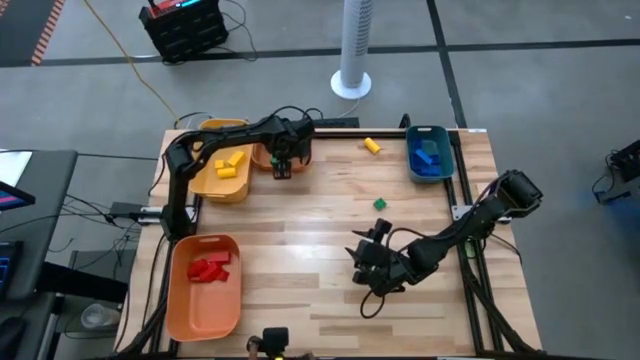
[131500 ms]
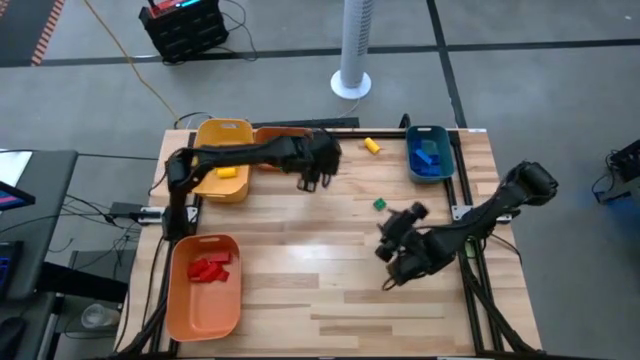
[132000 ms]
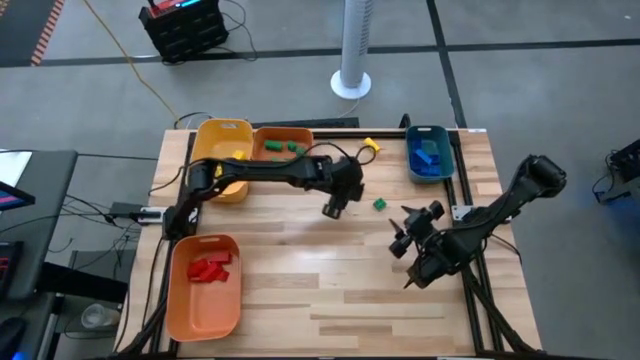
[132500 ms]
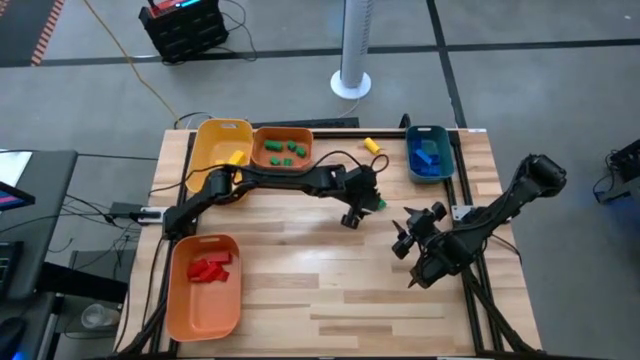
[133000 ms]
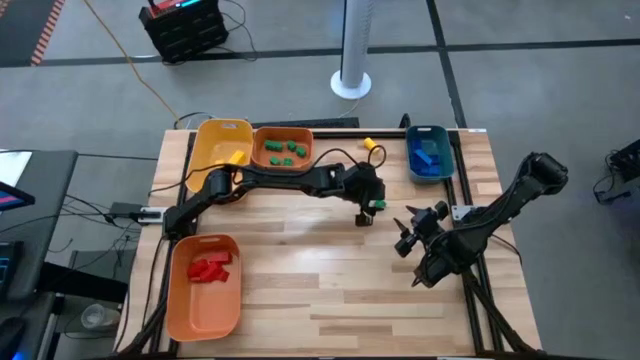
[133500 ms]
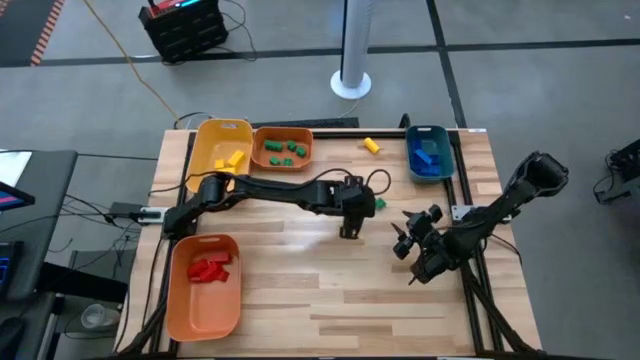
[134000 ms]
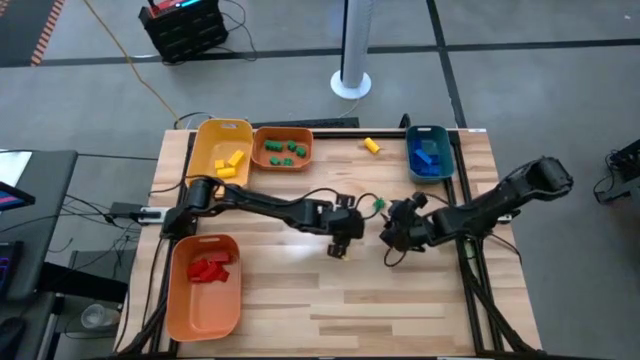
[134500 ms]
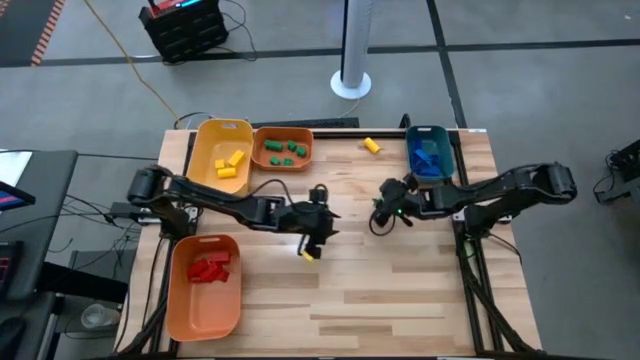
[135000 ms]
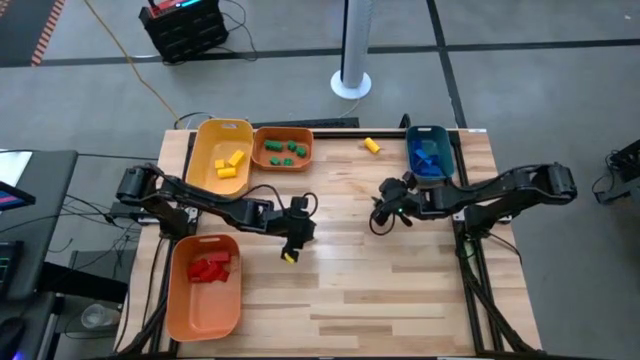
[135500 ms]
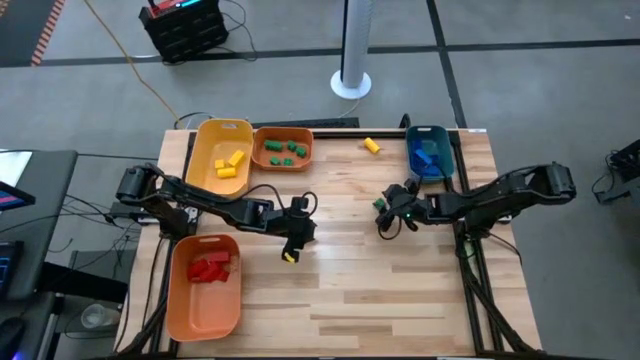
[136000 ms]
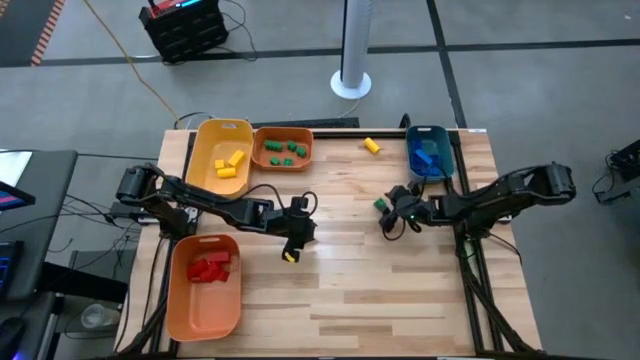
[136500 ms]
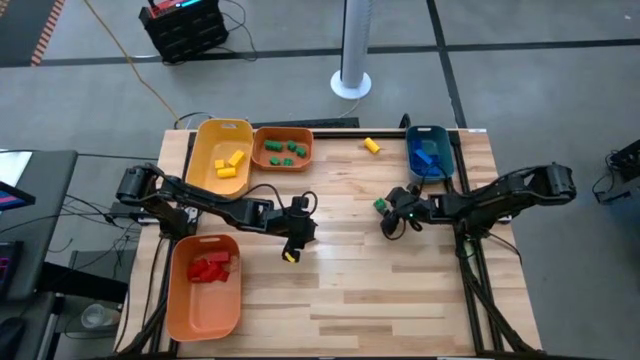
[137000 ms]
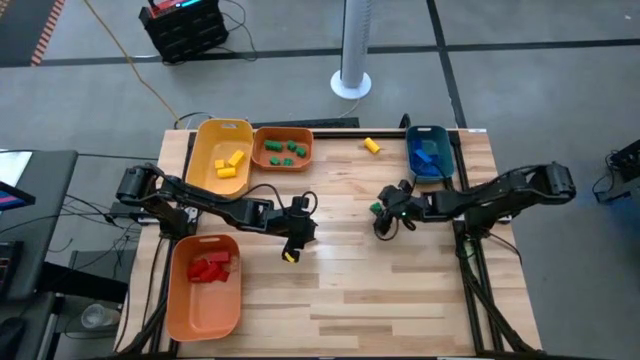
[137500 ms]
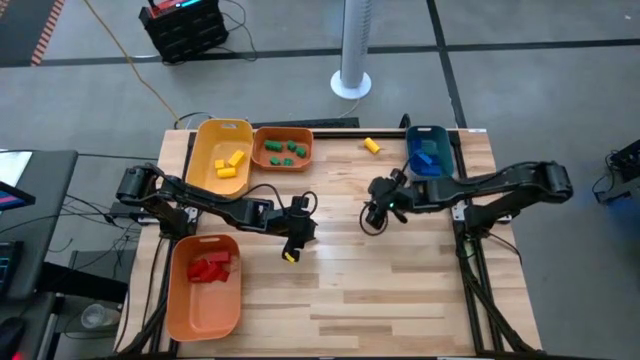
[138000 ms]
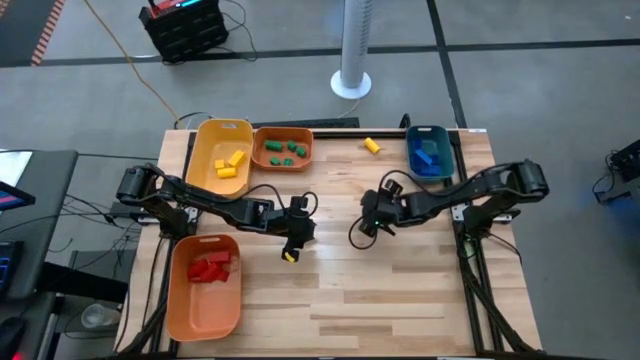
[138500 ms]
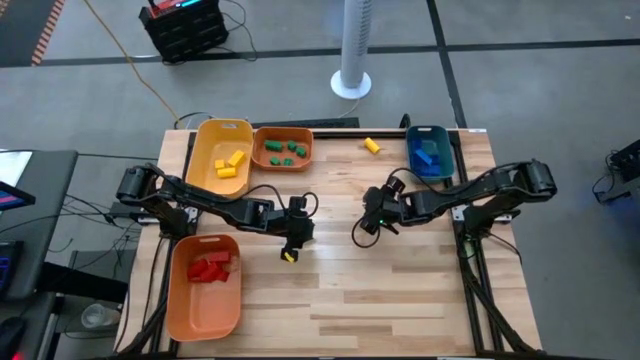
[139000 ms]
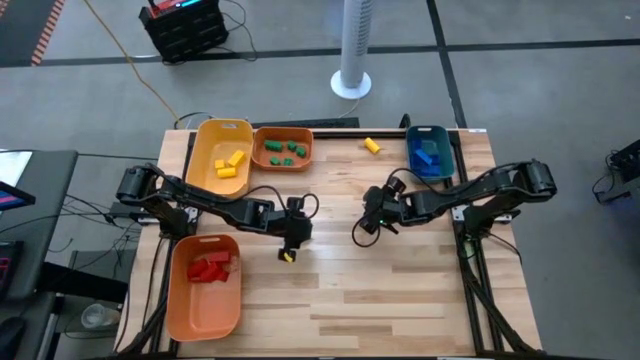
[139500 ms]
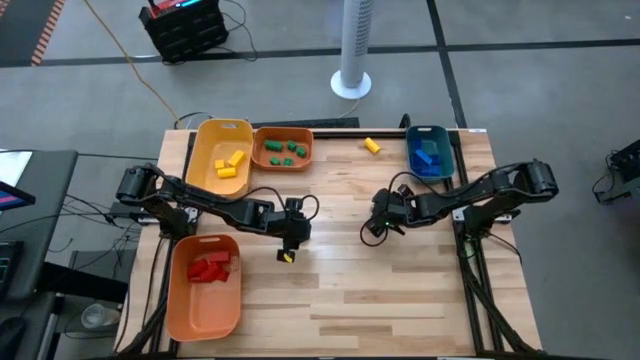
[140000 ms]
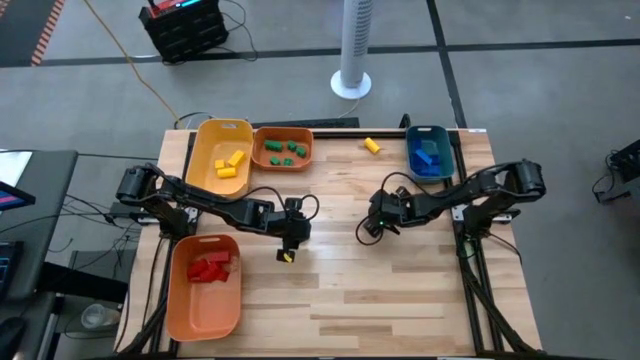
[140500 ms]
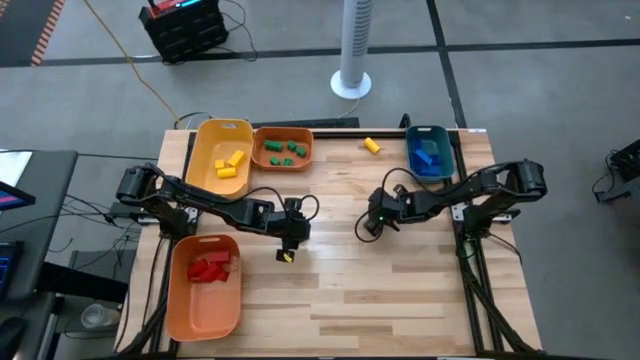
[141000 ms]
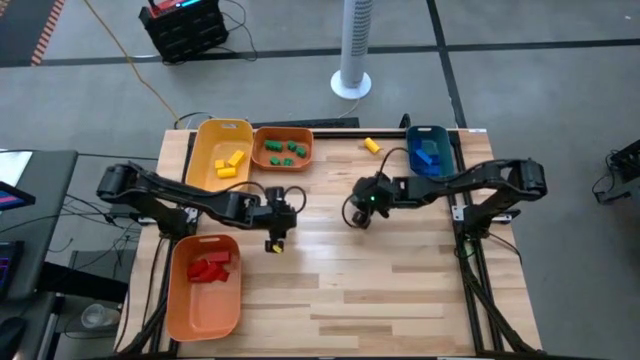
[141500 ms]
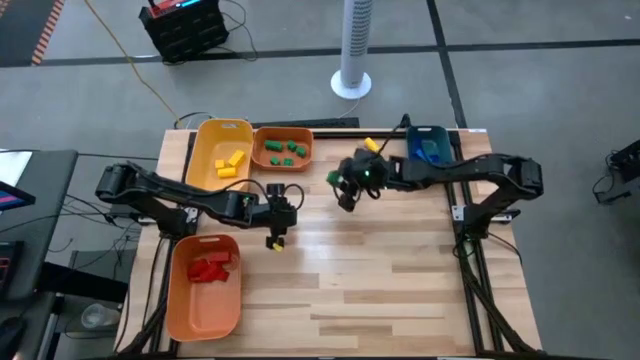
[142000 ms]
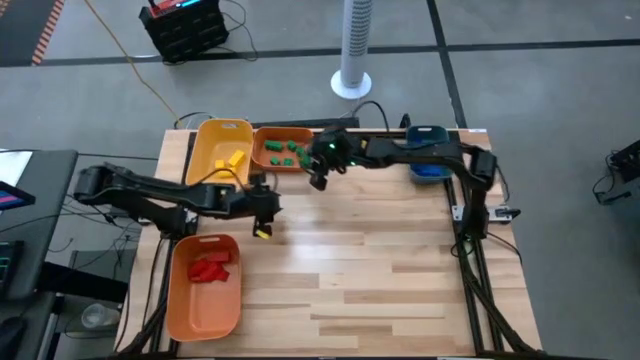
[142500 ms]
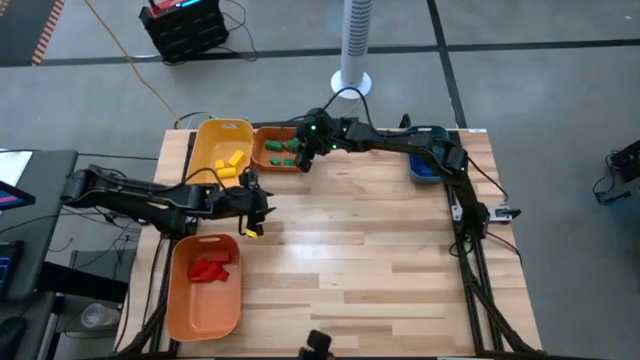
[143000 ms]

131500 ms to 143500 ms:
Task: Sort blocks
Put the green game piece into the top orange bin

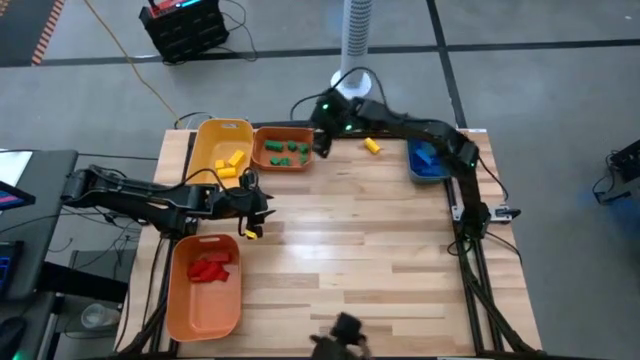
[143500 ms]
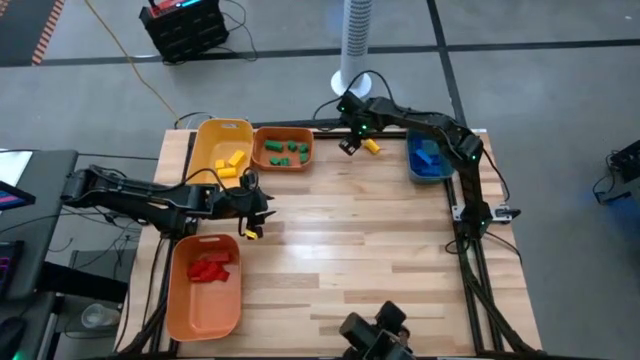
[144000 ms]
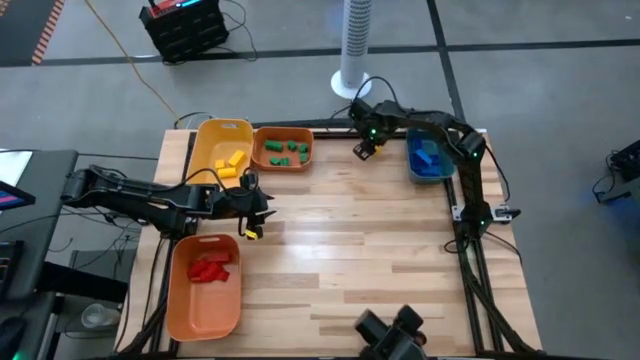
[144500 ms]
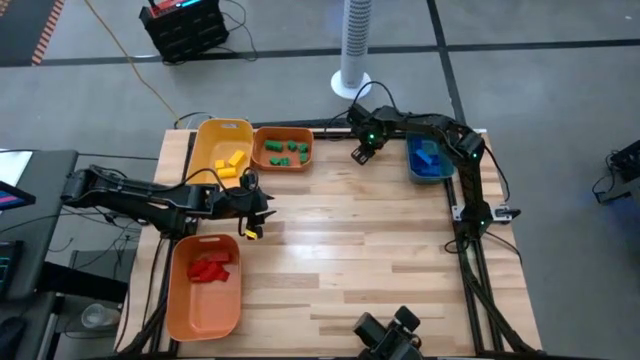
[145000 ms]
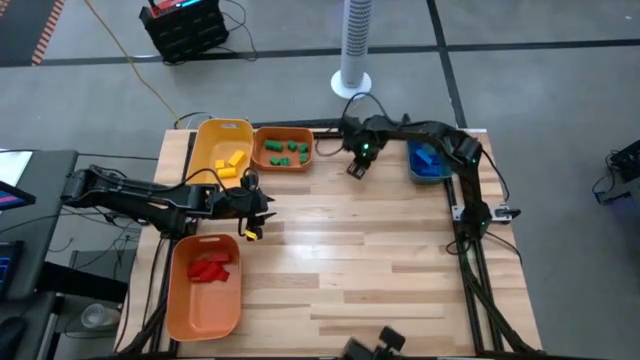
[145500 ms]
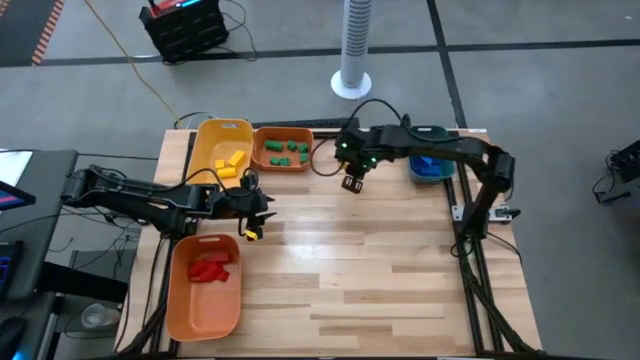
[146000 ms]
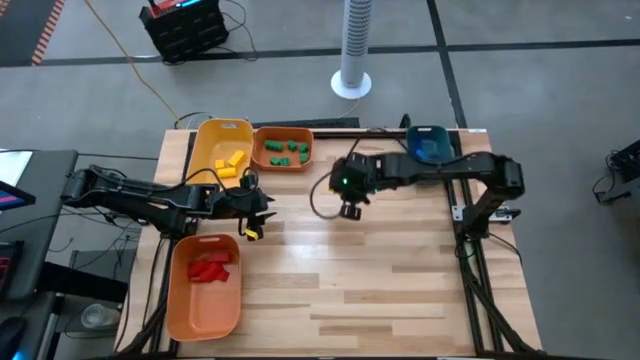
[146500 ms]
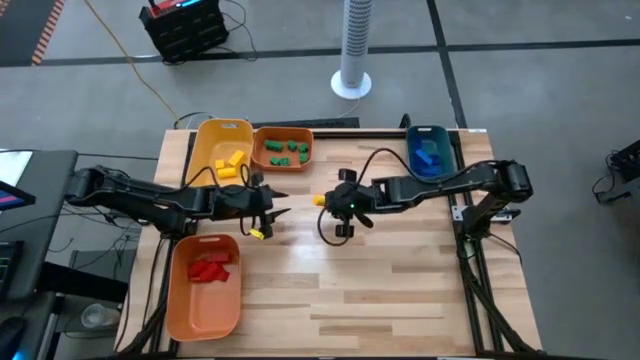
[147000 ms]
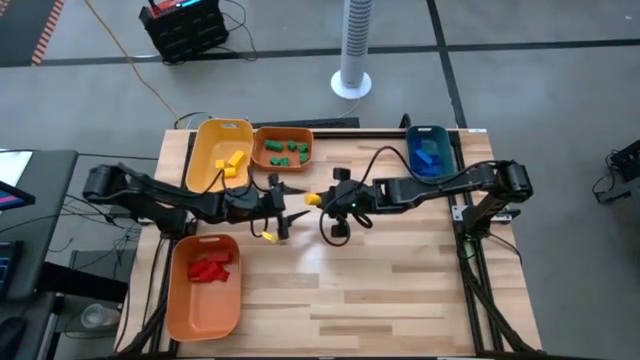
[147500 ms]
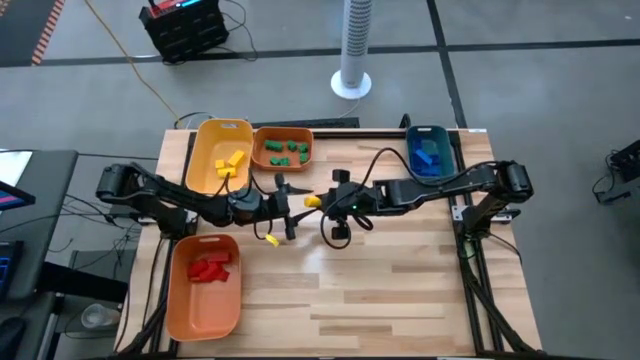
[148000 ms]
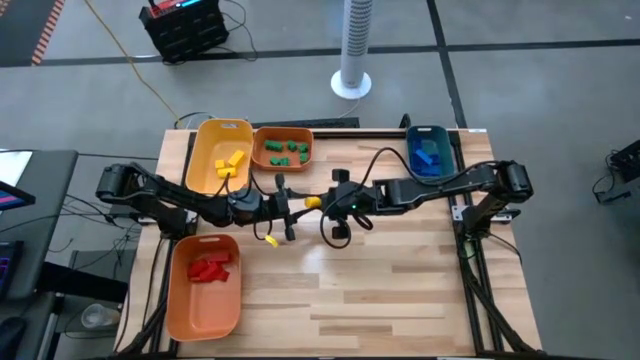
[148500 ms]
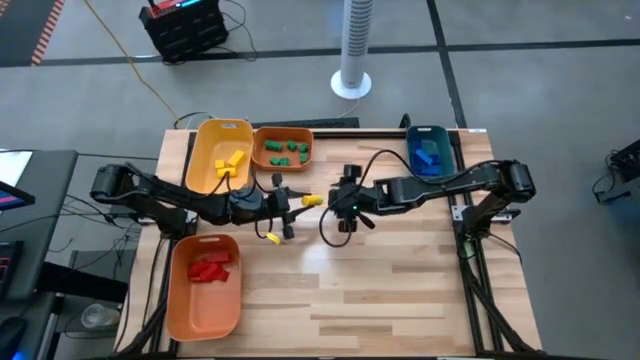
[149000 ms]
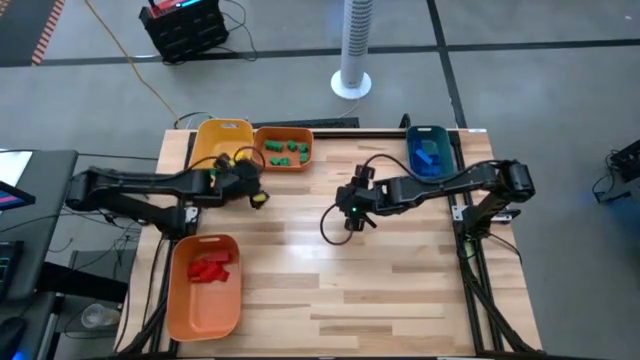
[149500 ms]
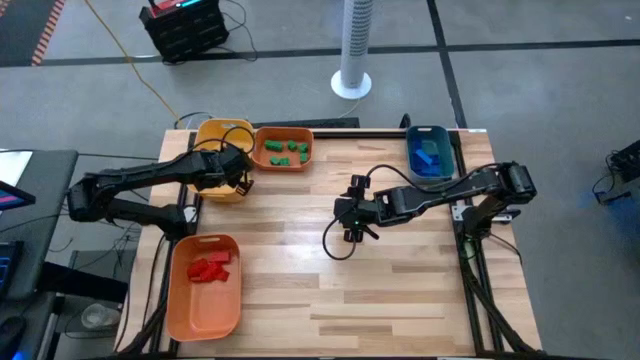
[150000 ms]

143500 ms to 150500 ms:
Put the yellow wooden block into the yellow bin

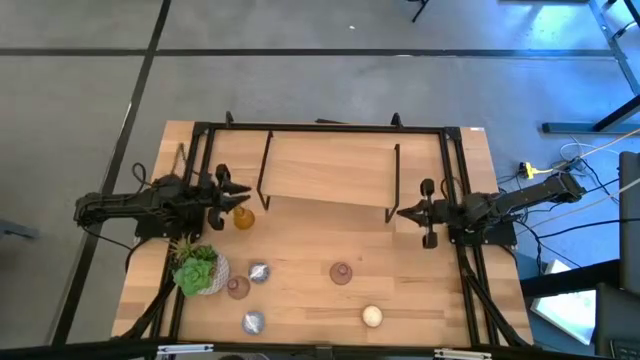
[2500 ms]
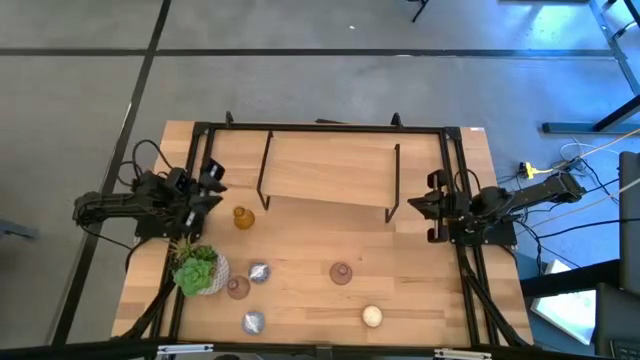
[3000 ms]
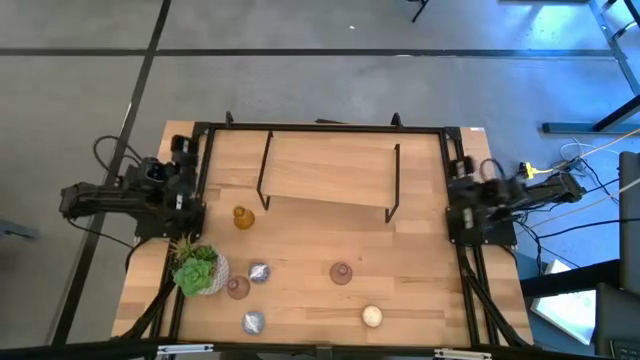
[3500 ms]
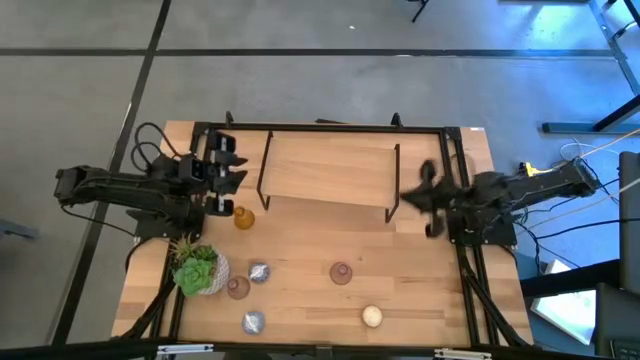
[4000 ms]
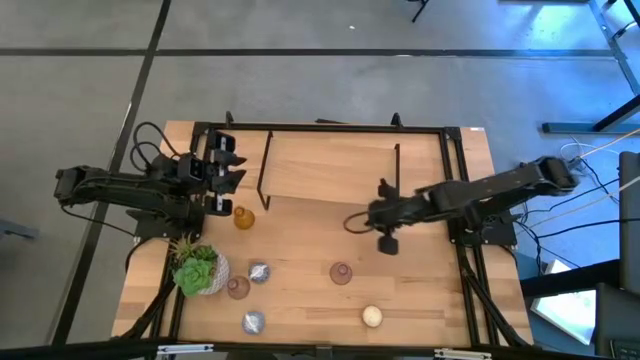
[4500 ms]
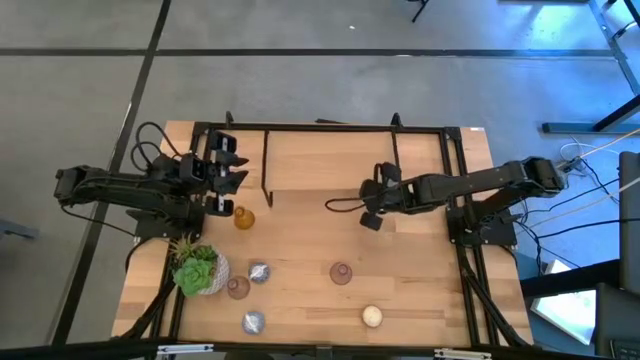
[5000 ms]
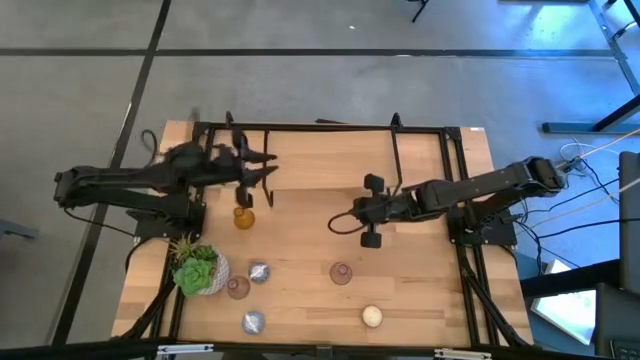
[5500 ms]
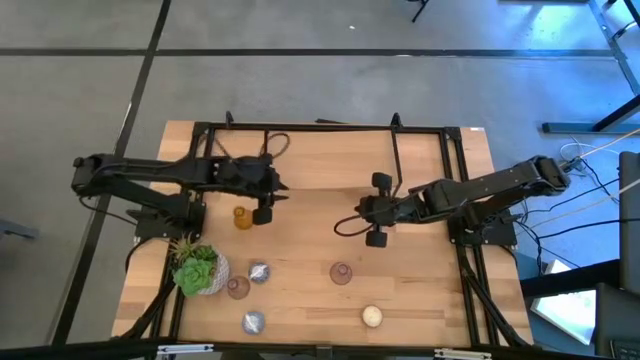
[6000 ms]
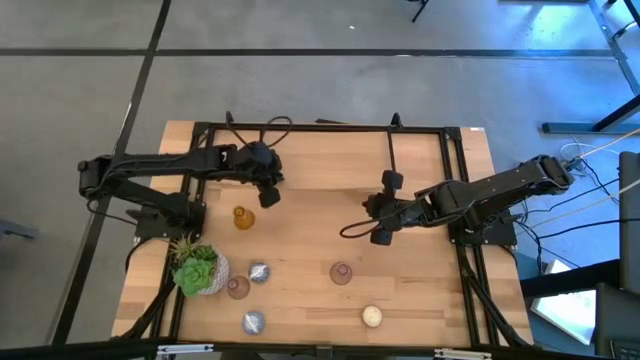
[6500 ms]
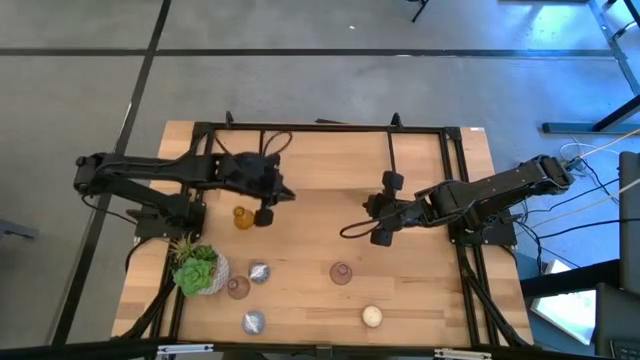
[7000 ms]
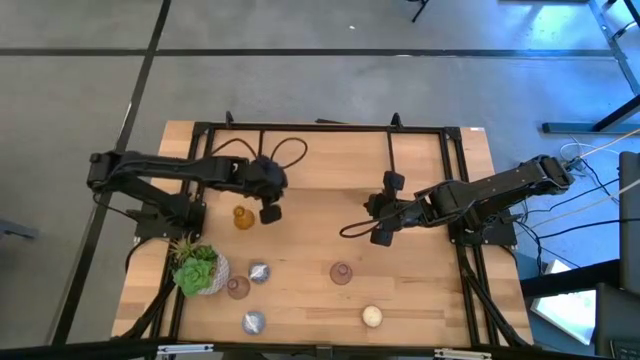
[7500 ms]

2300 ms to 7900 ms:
Task: Pick & Place candle stick holders
Adjust the shelf
